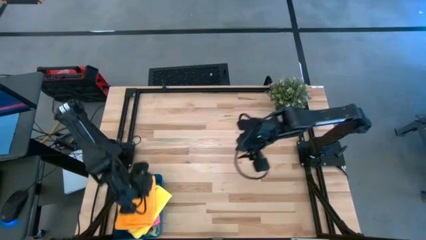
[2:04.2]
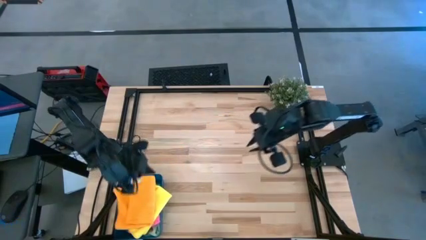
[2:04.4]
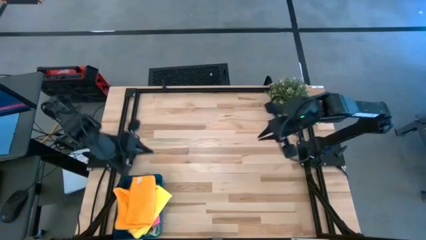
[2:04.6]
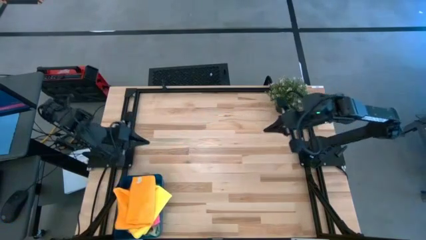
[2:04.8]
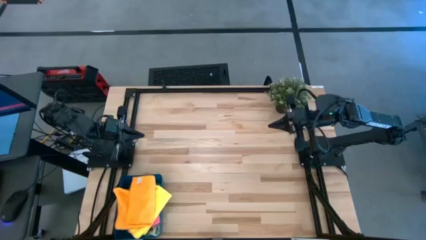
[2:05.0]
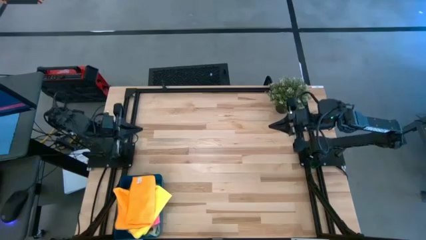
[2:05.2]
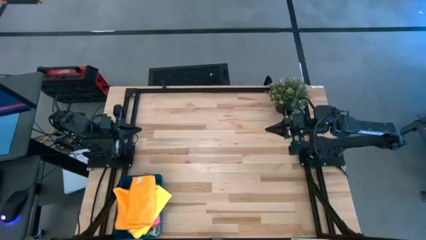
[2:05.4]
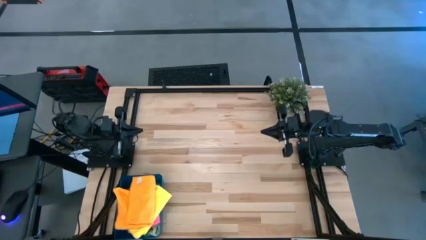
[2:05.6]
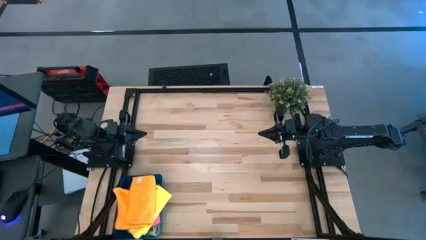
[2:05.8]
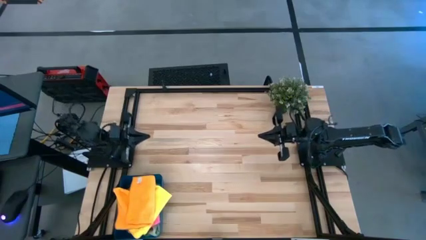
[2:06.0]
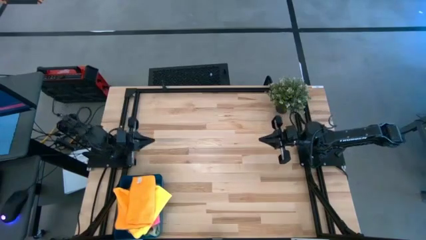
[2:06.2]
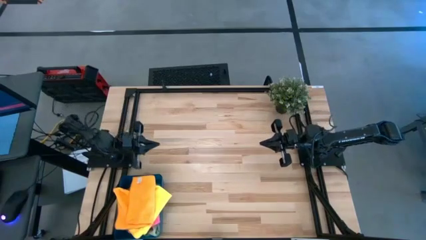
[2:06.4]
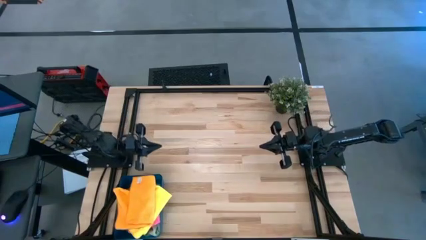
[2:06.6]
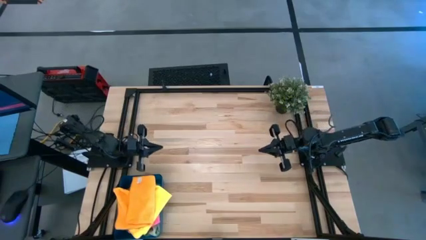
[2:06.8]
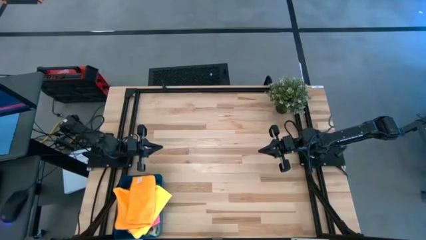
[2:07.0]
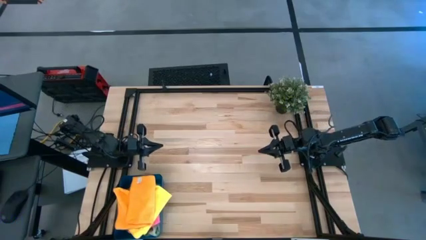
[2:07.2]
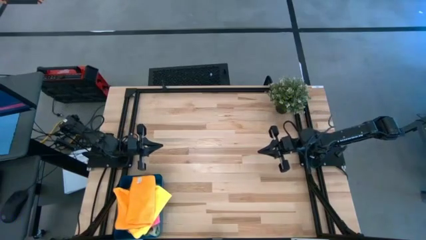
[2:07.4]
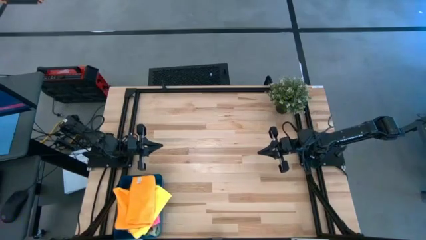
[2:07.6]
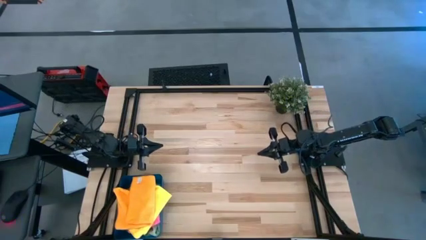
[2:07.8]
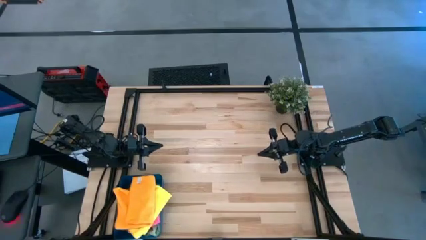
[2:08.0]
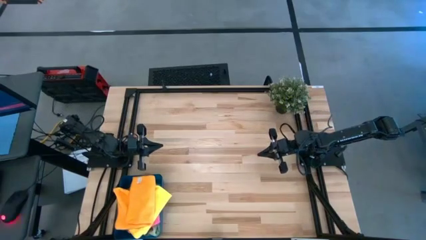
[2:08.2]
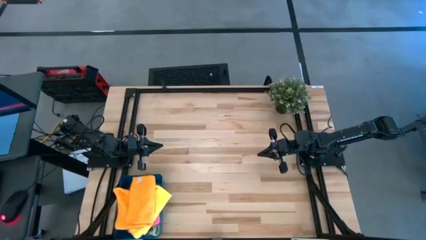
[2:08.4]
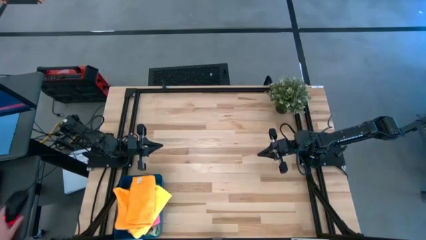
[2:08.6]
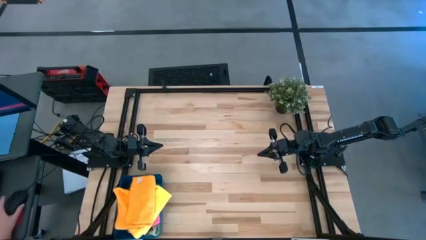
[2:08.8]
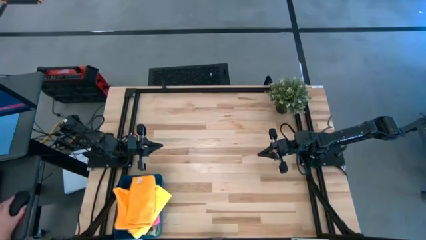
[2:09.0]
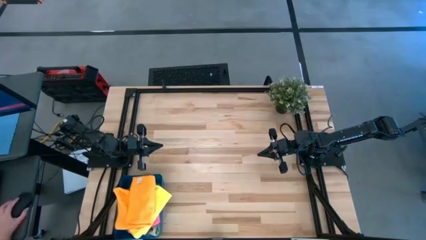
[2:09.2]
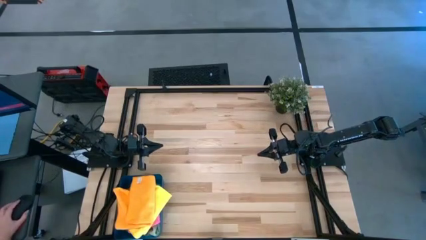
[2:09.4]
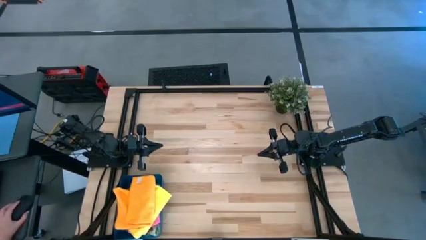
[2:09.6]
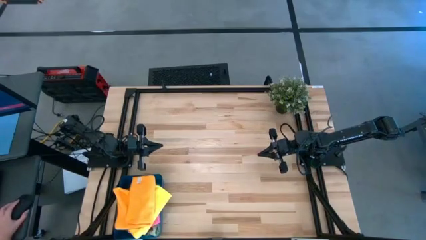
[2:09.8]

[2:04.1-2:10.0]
Task: Fold microfiber towels
Return to Home Position

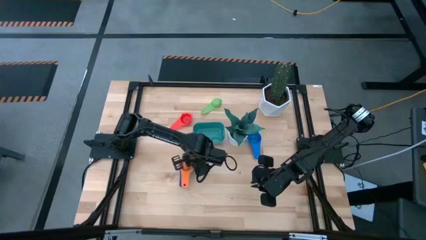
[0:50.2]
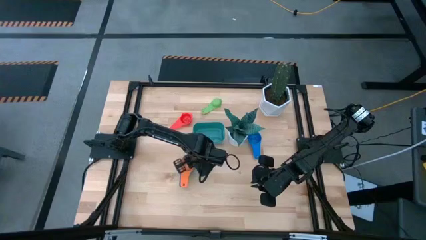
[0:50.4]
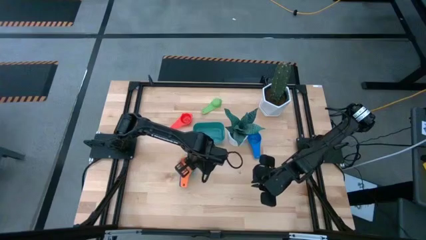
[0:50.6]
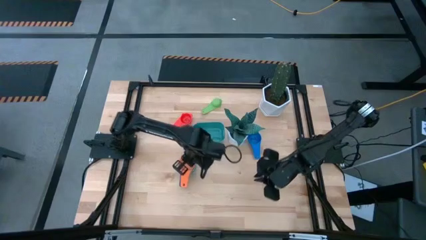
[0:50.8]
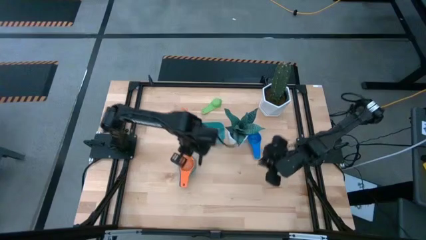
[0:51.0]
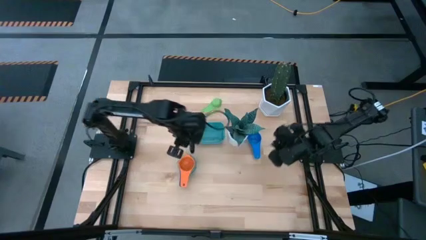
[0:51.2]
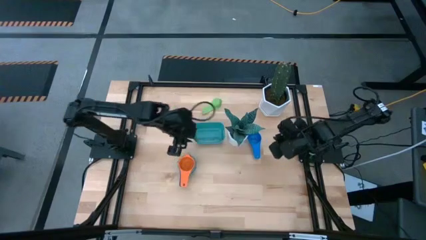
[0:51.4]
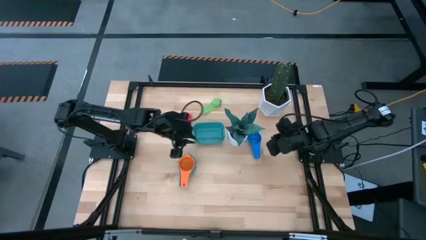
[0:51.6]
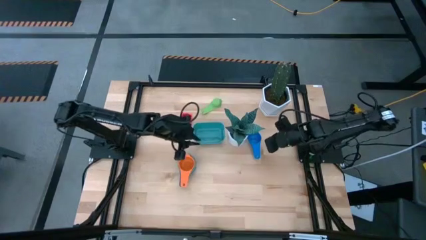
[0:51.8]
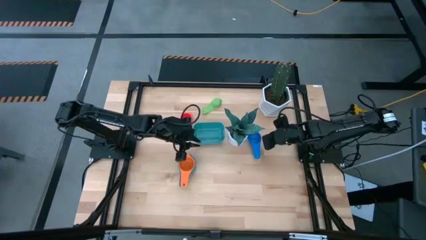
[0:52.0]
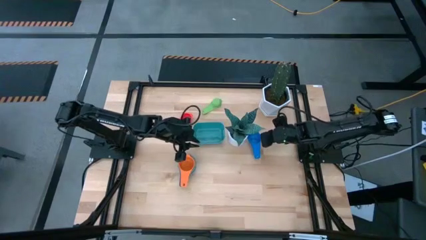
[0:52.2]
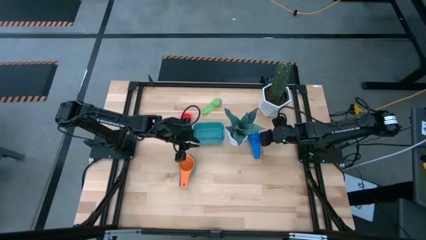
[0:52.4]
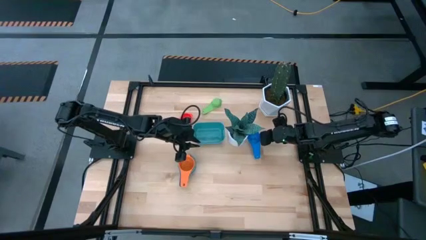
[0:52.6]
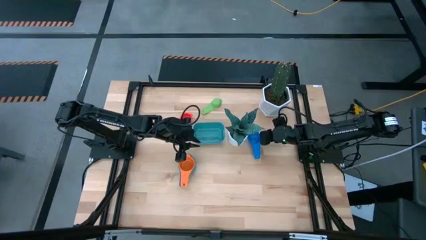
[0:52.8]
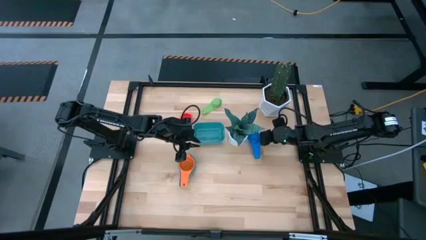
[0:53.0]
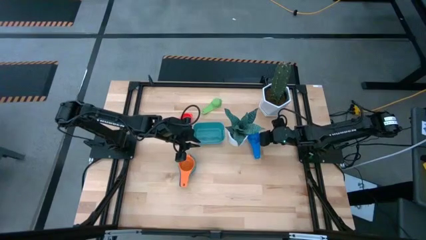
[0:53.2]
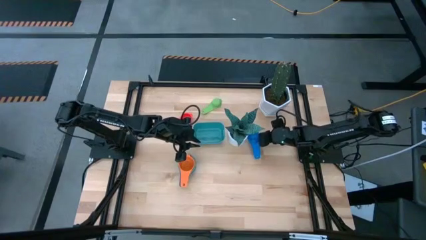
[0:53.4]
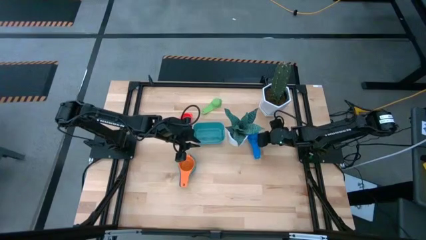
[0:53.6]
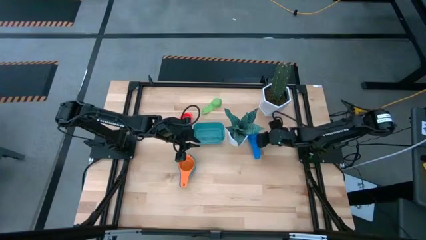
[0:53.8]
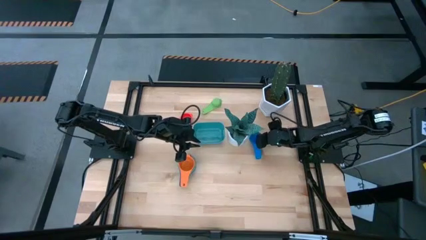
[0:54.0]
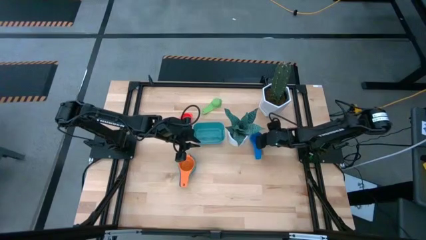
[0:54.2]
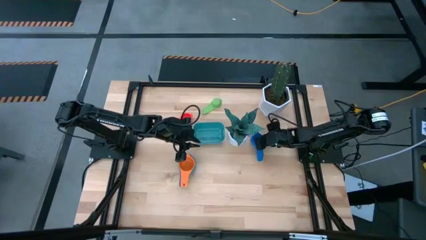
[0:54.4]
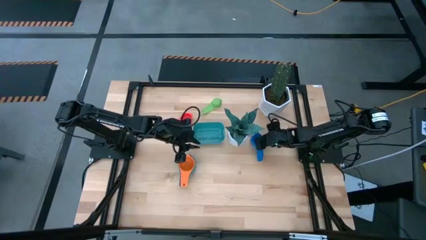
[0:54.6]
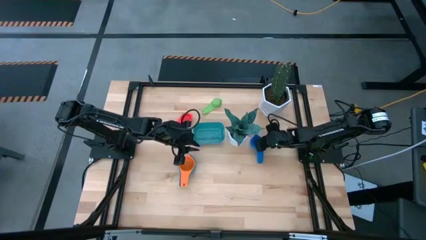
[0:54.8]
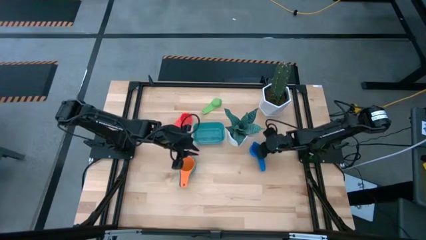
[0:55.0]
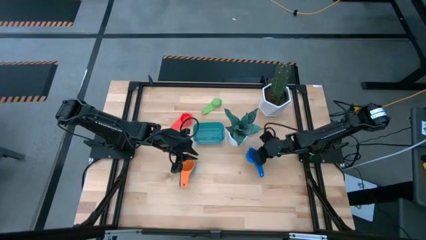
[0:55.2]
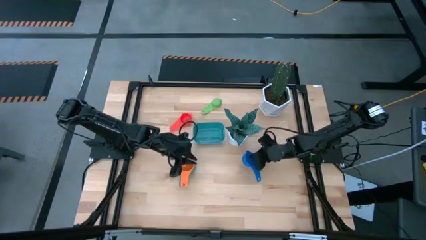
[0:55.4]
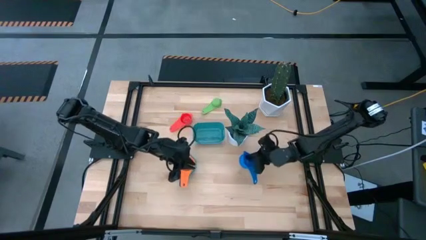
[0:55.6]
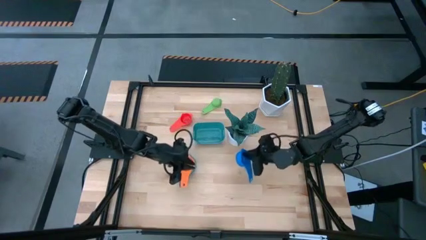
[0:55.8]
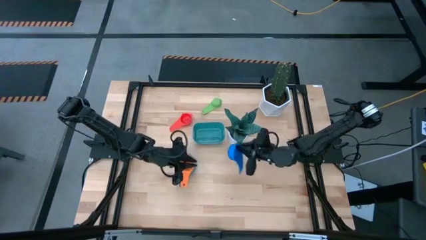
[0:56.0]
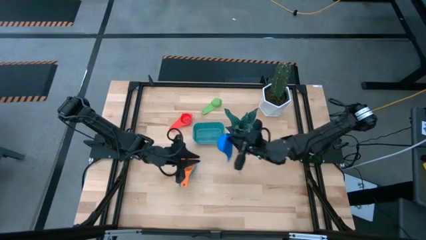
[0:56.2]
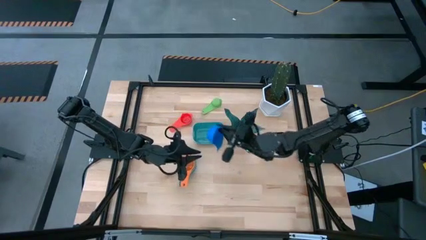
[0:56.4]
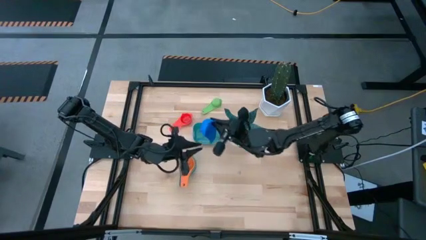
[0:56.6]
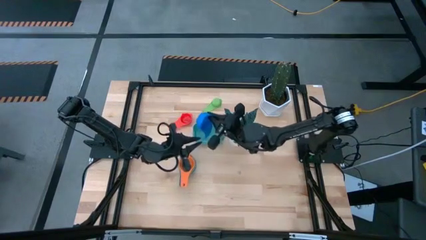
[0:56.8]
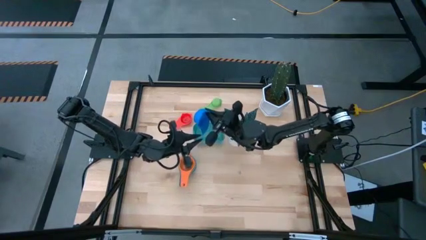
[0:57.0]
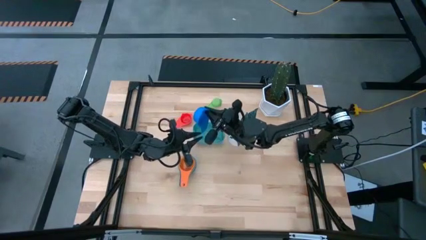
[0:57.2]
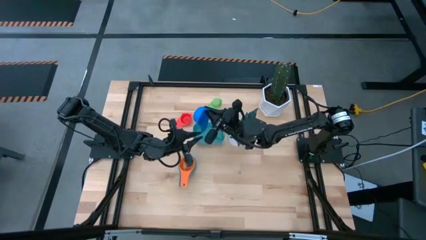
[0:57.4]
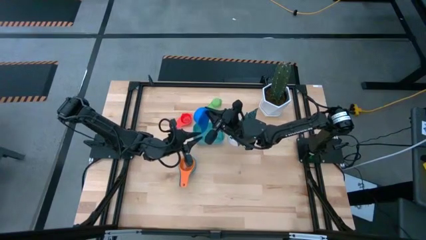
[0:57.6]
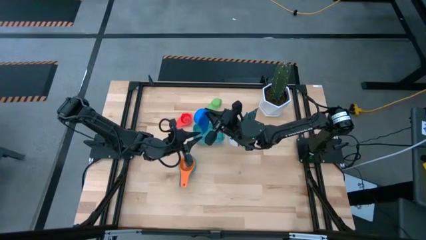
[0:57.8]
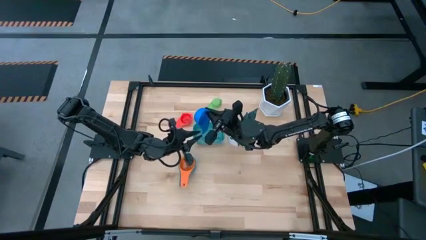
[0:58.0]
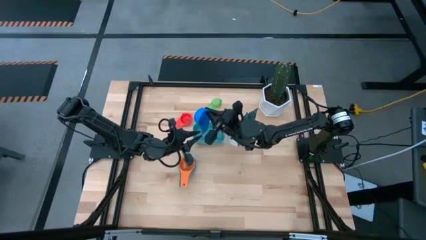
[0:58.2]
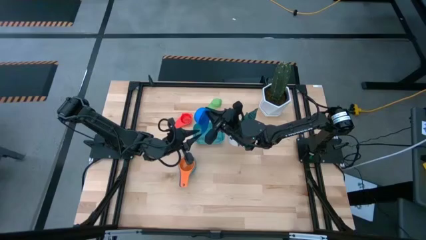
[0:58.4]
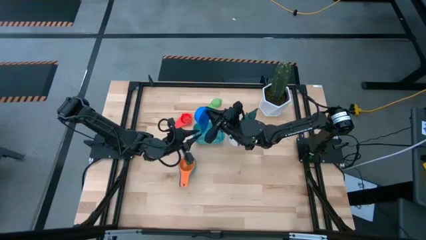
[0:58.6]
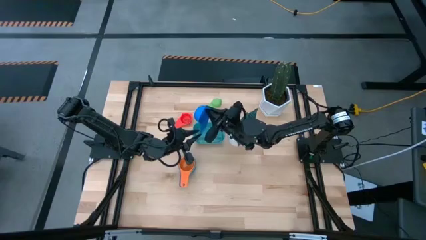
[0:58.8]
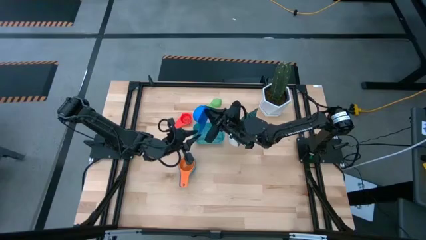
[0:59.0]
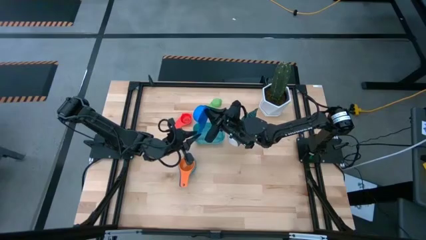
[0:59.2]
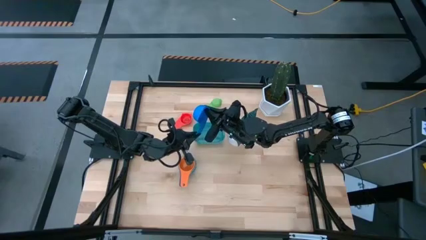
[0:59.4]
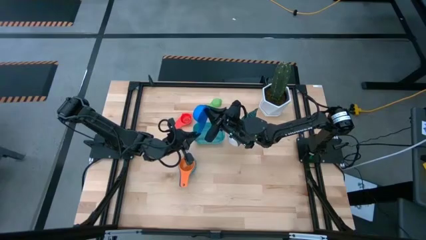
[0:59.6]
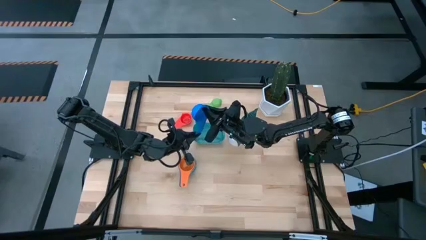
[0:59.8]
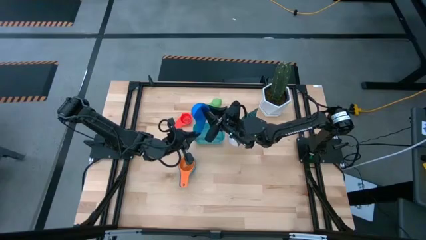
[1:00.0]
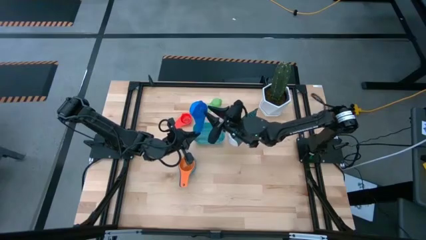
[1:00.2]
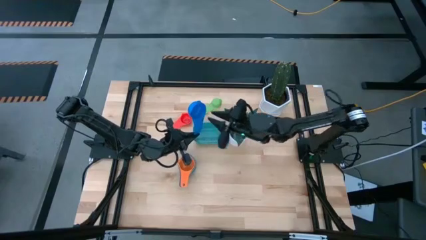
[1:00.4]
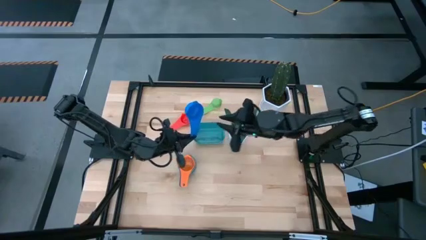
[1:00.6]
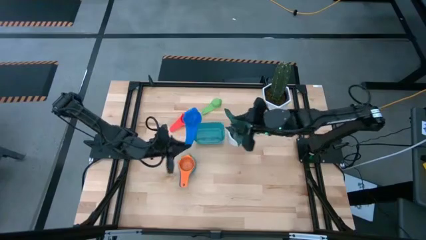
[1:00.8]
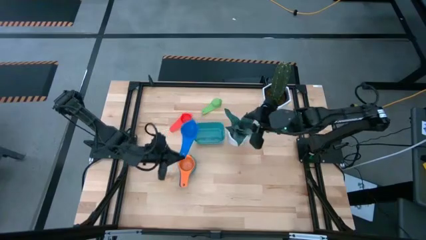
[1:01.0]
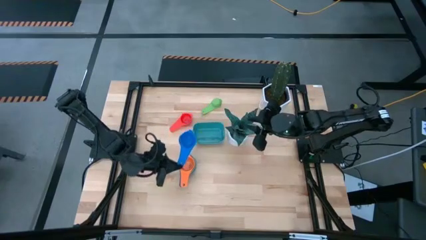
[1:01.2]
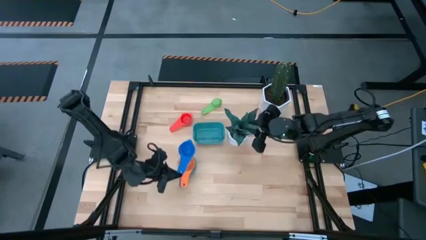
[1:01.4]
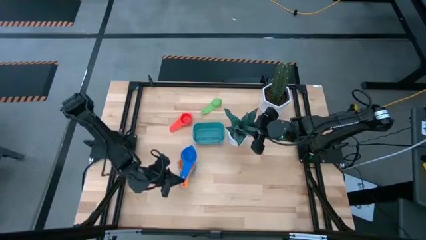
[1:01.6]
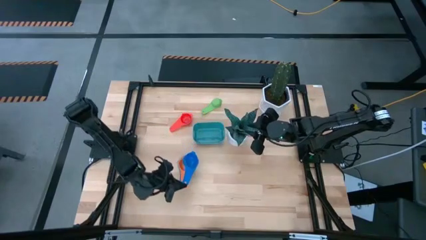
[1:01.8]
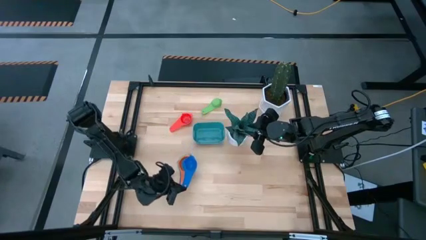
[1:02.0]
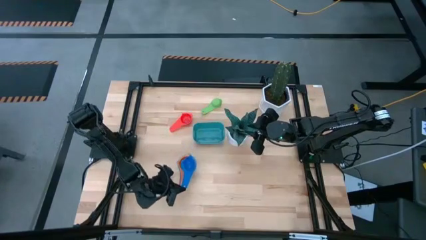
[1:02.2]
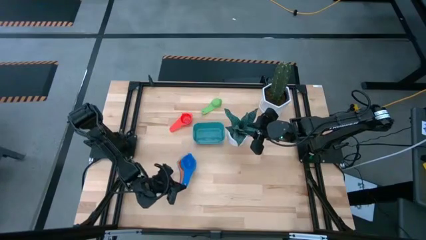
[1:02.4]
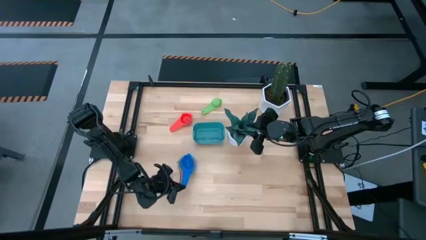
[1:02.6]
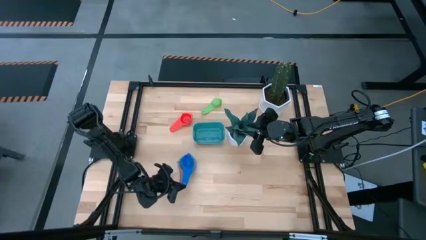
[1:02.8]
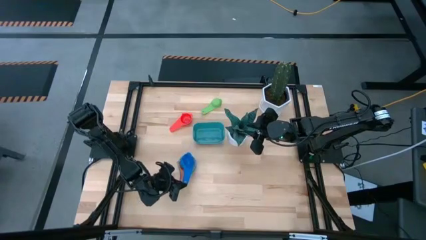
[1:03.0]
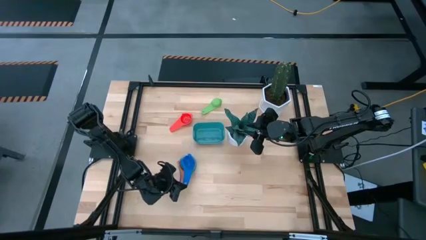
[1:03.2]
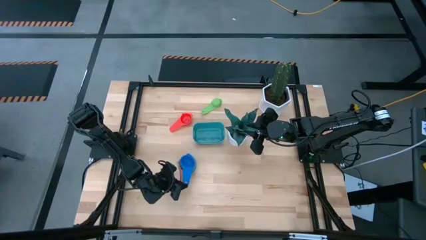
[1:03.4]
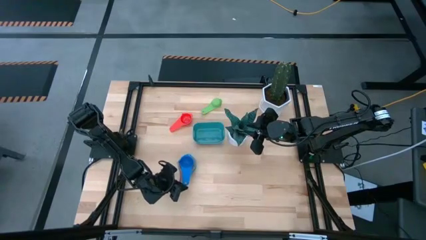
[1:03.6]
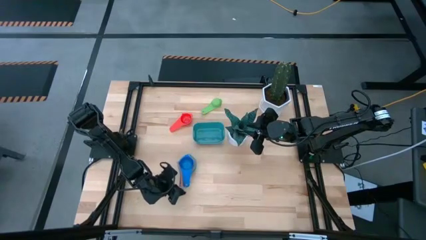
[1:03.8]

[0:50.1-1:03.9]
Task: Nest measuring cups in basket
Stack the blue measuring cup on top of the orange measuring cup
